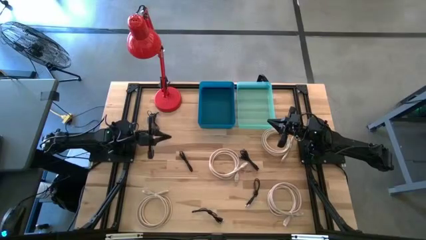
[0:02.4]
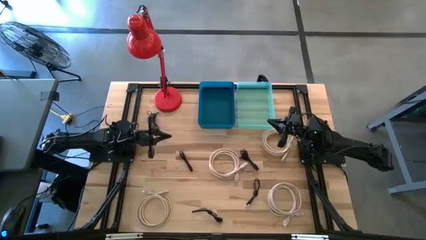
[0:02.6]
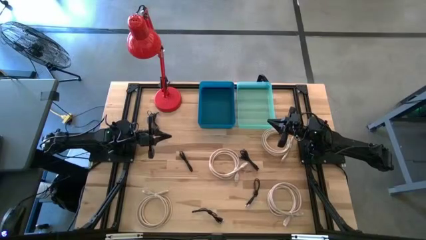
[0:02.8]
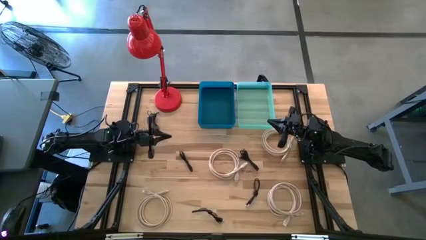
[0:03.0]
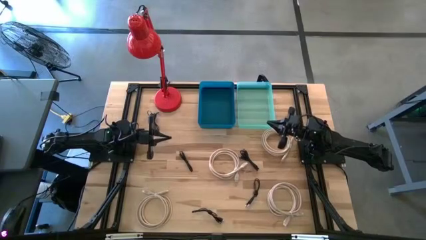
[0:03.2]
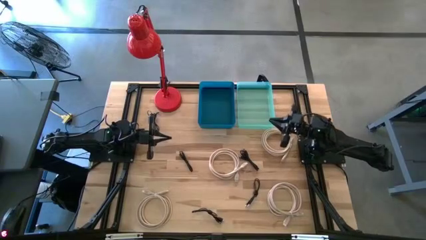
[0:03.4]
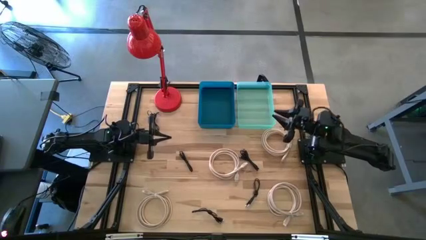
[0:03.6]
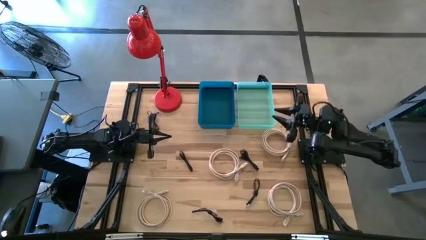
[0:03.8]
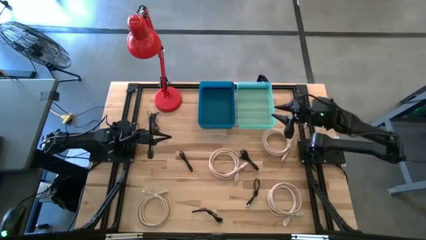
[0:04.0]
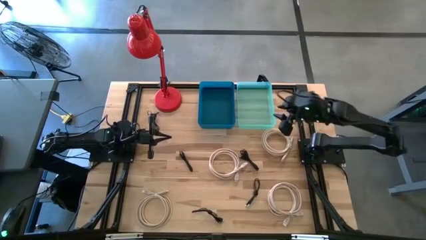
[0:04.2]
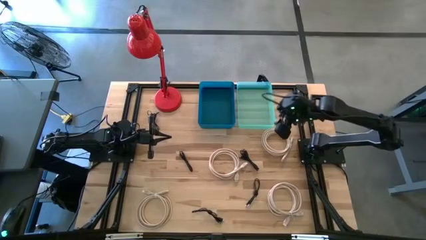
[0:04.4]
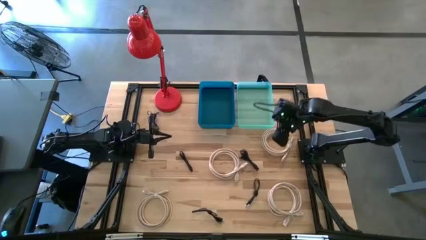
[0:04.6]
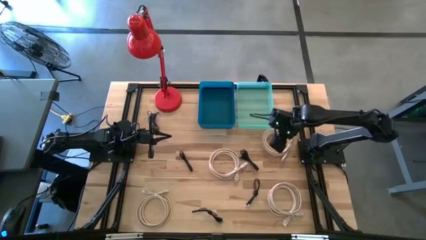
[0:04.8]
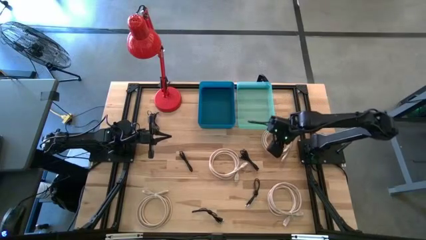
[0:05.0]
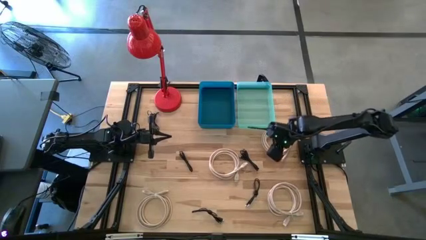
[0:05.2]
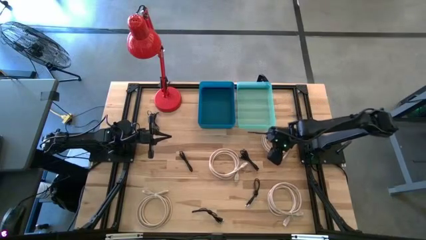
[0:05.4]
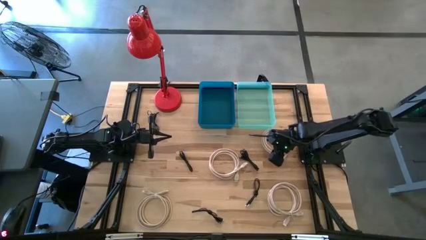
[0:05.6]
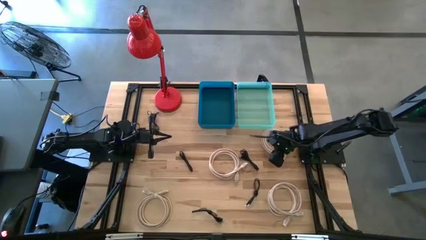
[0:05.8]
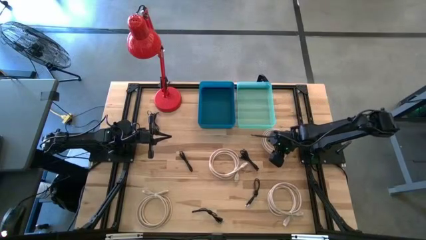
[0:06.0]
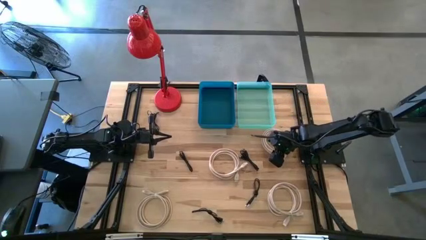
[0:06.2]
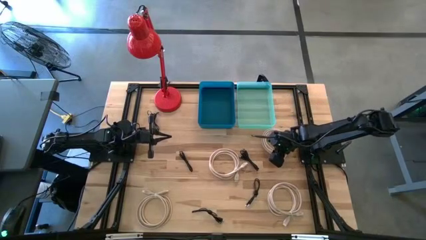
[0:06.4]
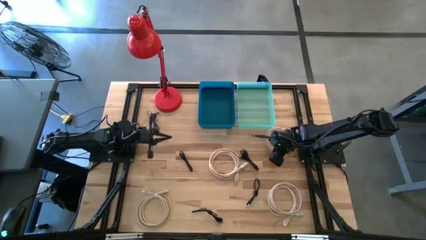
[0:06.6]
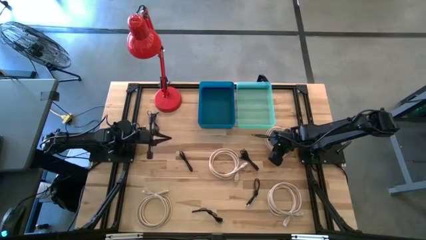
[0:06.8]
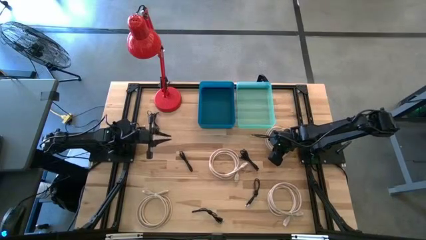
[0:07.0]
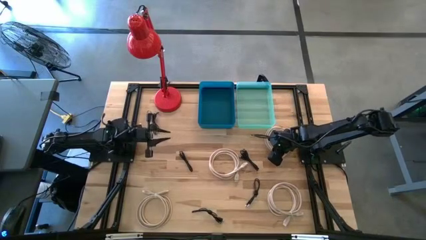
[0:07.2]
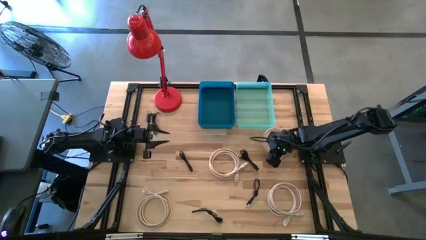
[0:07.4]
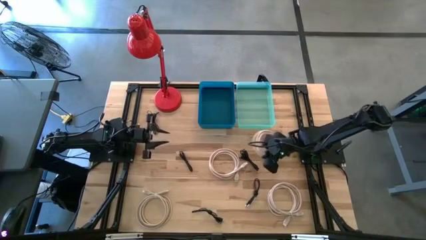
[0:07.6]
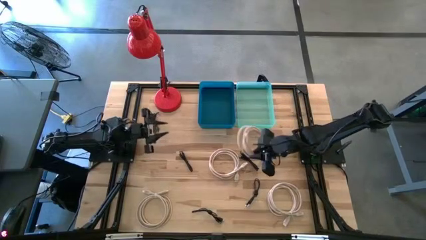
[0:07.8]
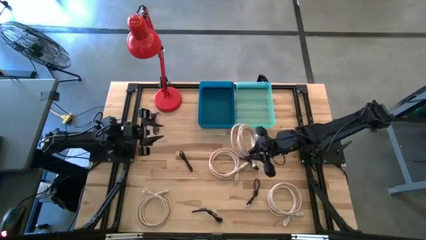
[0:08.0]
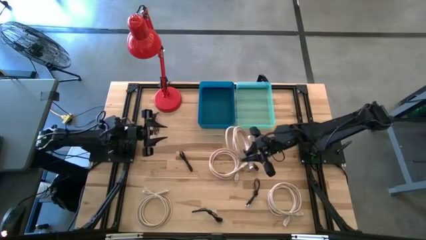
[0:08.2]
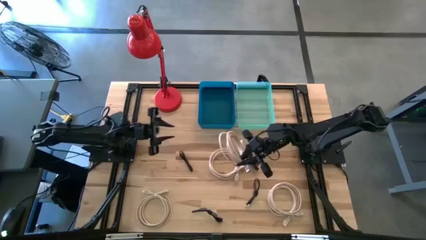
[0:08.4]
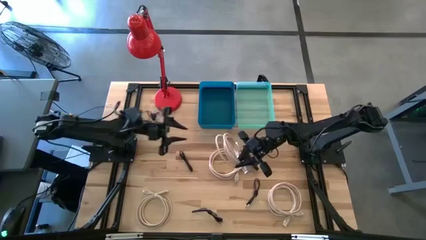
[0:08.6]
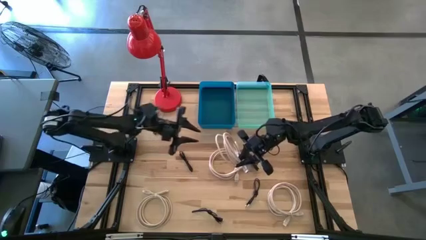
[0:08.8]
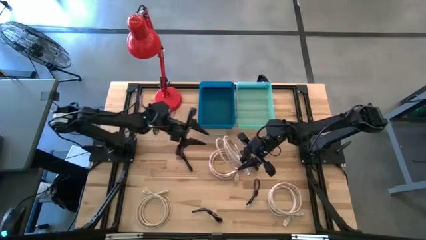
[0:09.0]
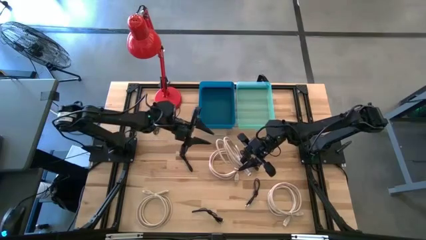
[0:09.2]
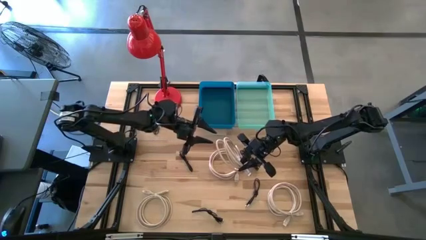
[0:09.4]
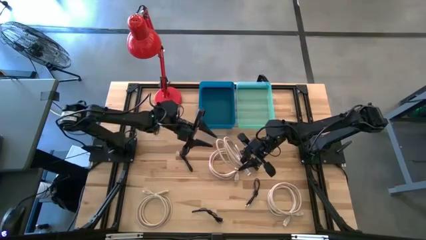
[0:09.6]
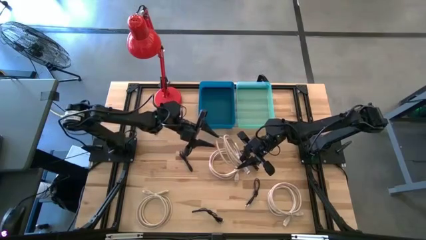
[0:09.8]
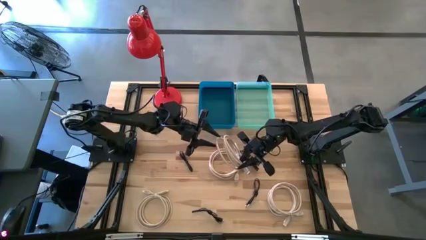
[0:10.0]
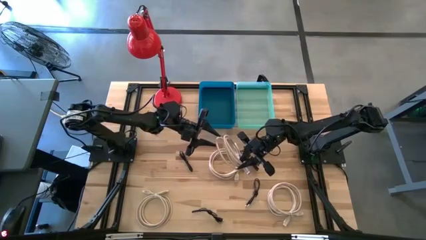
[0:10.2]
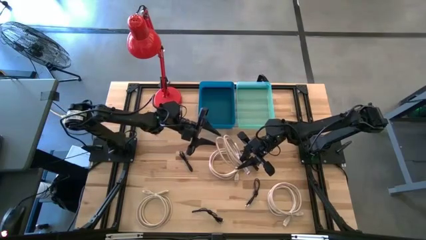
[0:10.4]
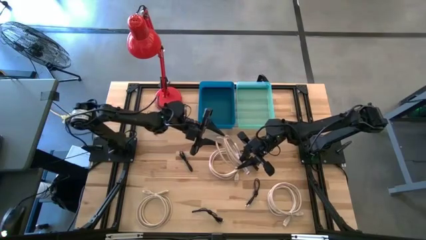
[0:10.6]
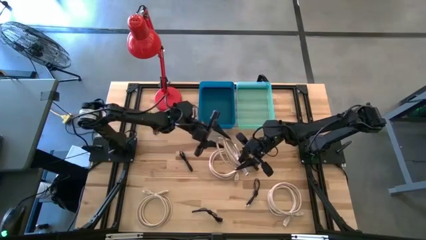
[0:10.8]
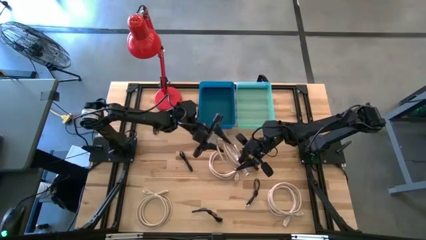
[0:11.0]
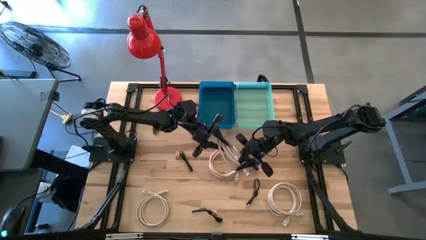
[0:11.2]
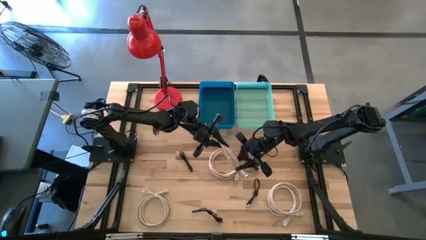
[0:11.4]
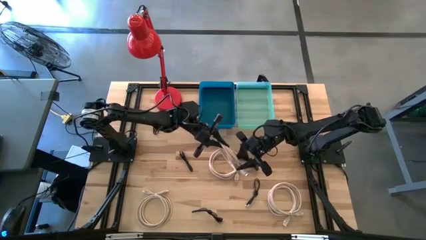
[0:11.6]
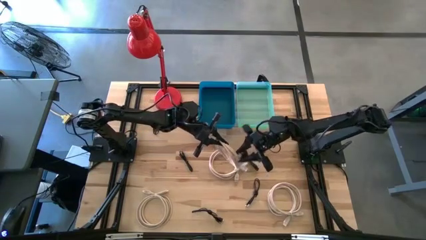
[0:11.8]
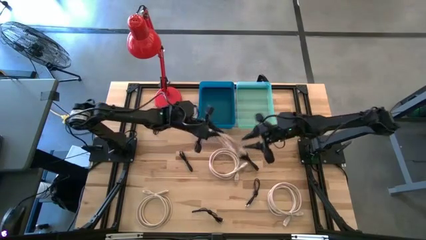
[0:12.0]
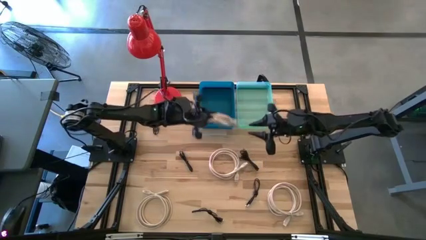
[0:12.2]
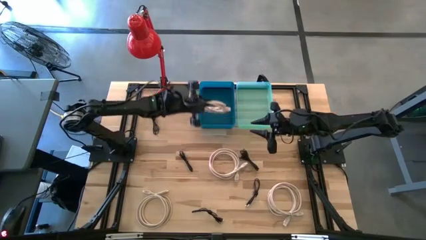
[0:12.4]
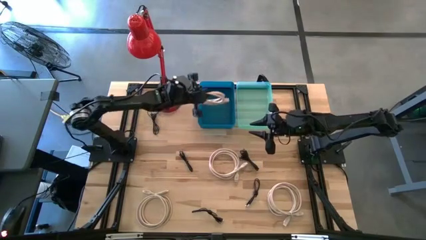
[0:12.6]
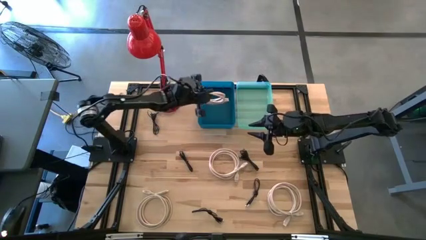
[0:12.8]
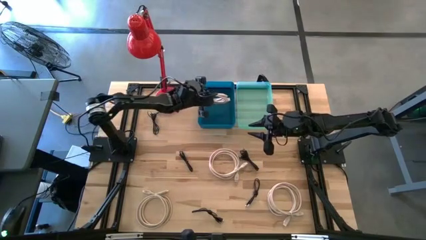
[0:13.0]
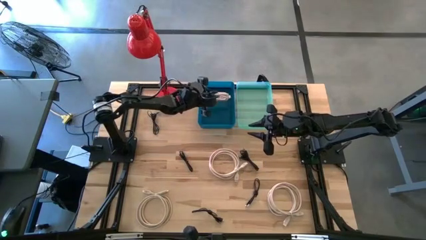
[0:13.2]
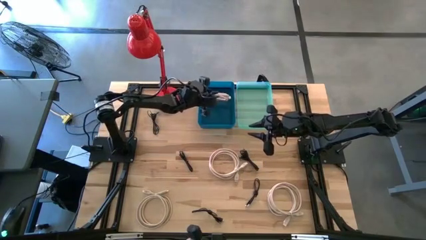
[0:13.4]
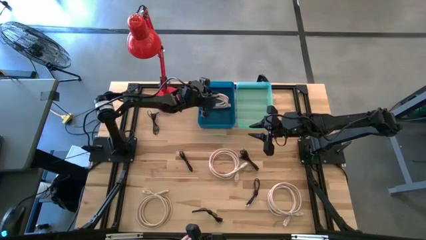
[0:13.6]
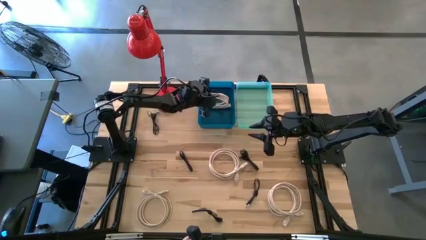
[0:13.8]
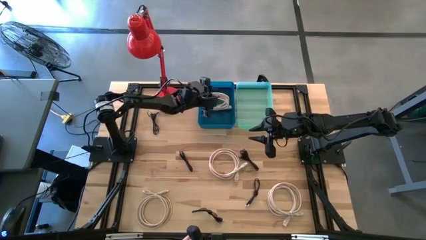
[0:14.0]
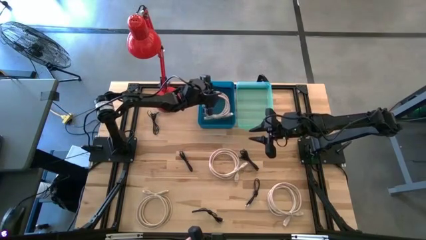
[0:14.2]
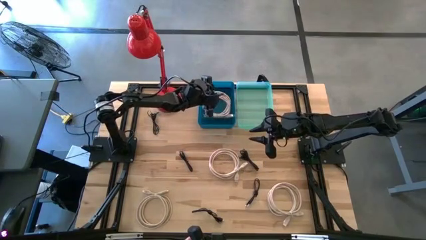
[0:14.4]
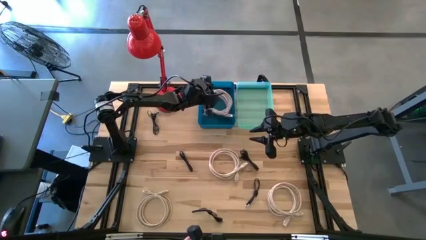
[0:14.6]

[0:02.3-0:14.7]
Task: Pick & Place USB Port
Put the white charger cable into the blue bin
